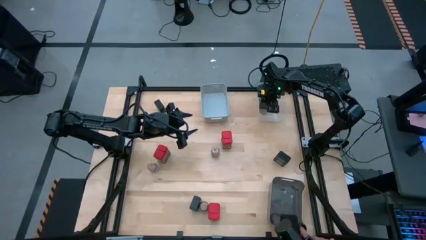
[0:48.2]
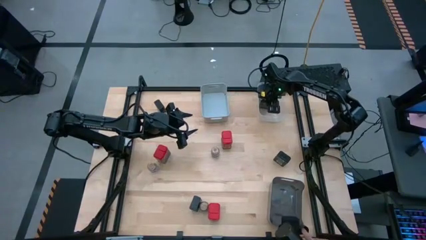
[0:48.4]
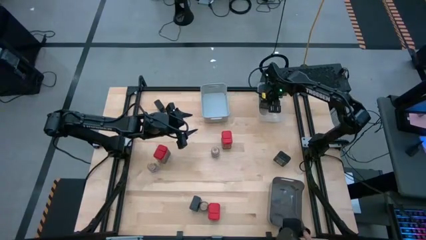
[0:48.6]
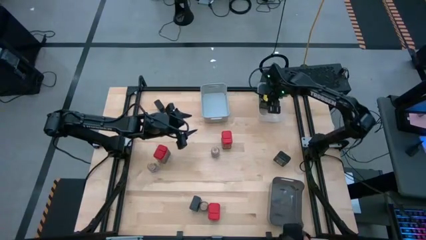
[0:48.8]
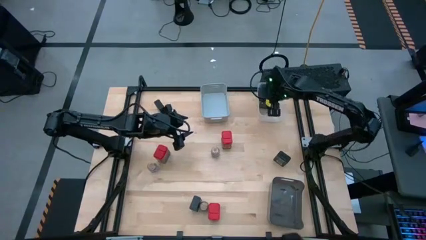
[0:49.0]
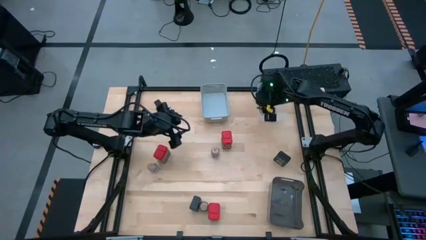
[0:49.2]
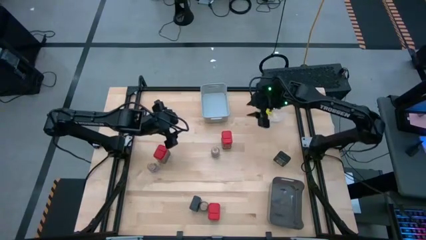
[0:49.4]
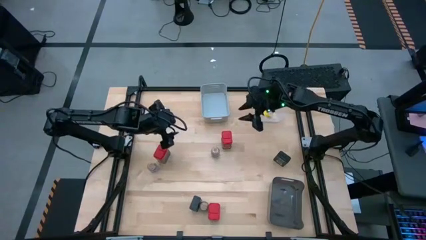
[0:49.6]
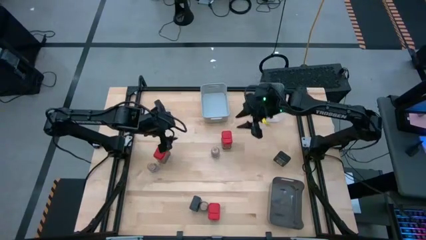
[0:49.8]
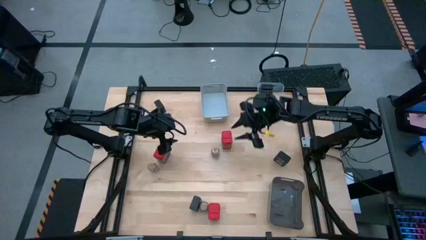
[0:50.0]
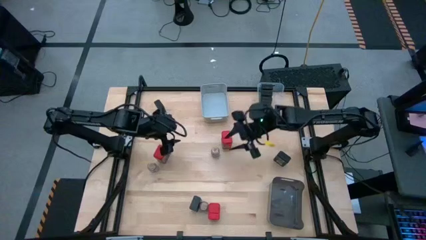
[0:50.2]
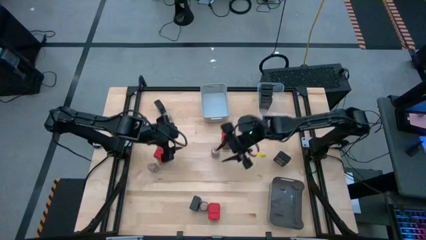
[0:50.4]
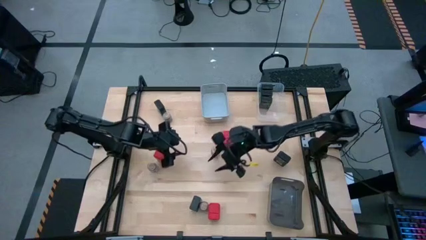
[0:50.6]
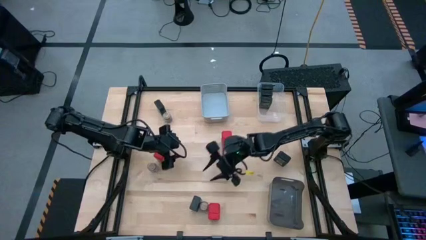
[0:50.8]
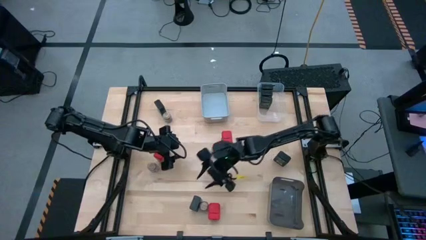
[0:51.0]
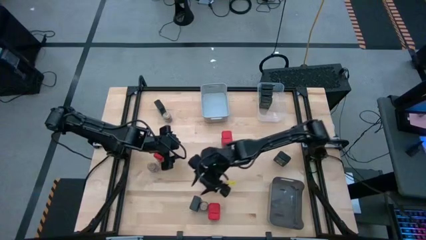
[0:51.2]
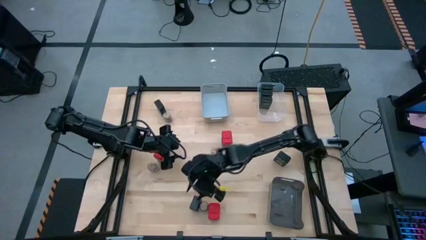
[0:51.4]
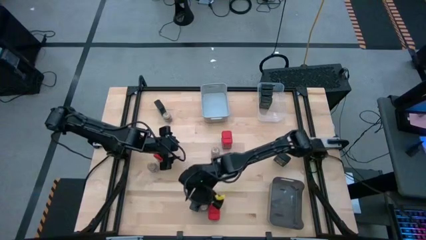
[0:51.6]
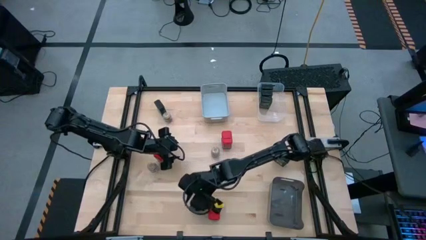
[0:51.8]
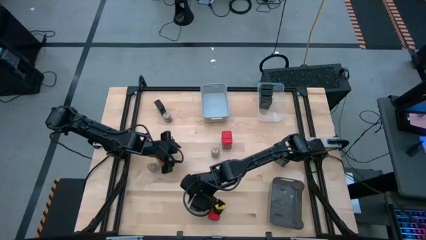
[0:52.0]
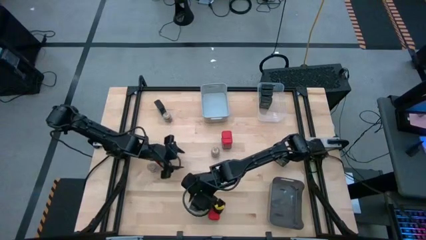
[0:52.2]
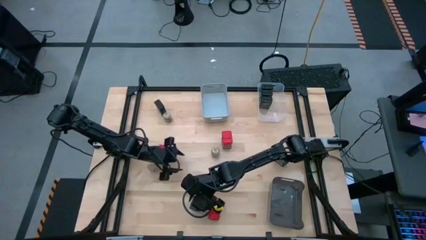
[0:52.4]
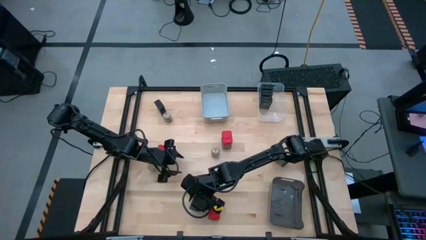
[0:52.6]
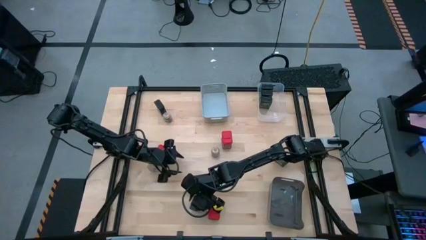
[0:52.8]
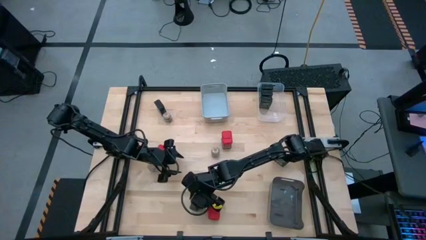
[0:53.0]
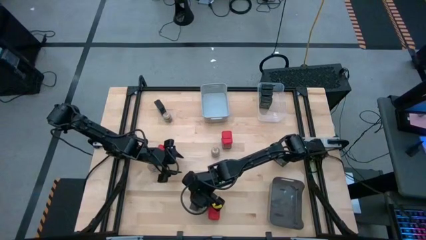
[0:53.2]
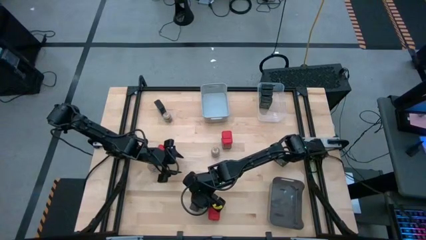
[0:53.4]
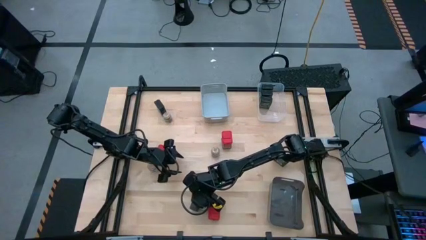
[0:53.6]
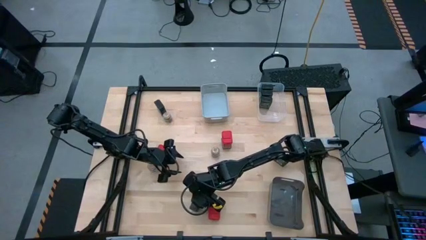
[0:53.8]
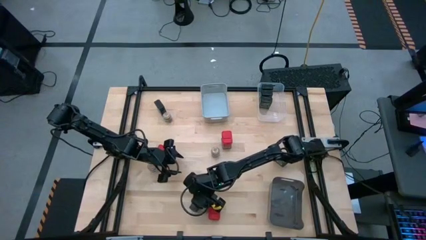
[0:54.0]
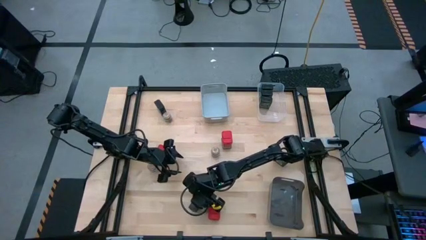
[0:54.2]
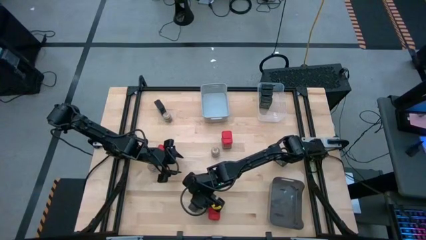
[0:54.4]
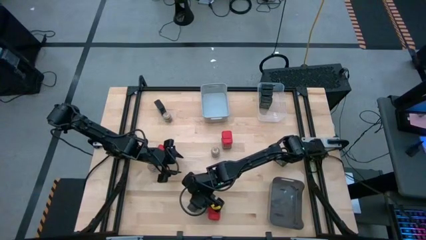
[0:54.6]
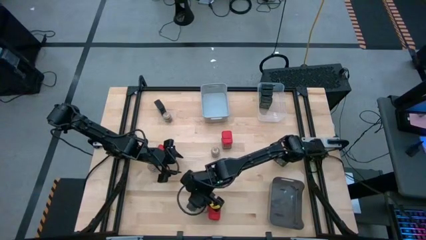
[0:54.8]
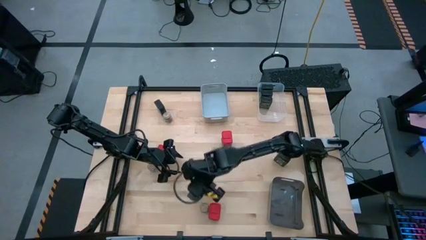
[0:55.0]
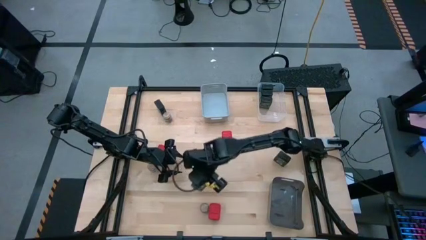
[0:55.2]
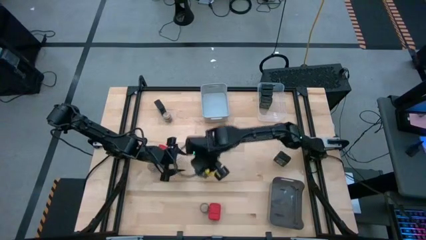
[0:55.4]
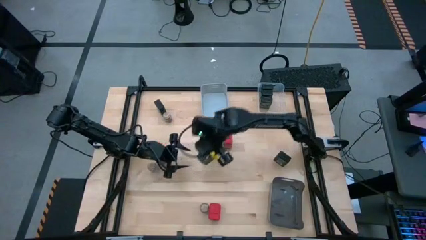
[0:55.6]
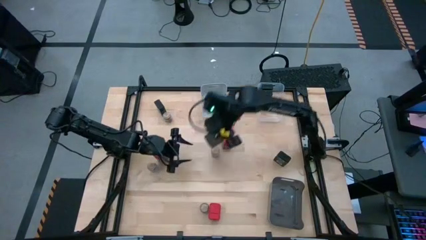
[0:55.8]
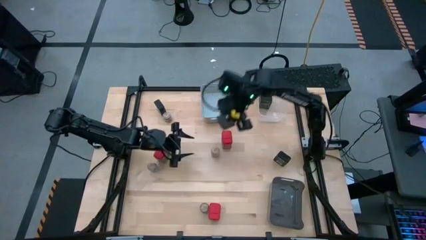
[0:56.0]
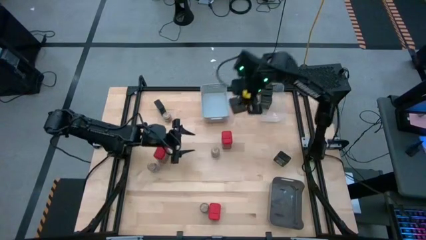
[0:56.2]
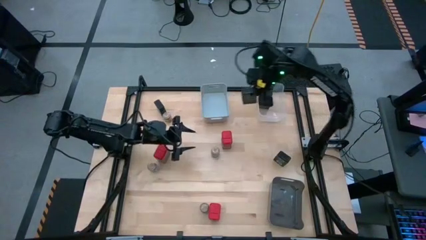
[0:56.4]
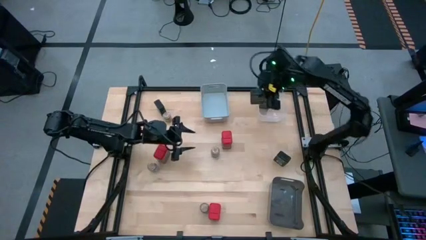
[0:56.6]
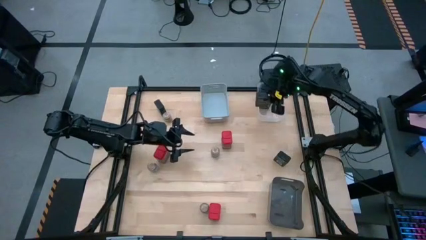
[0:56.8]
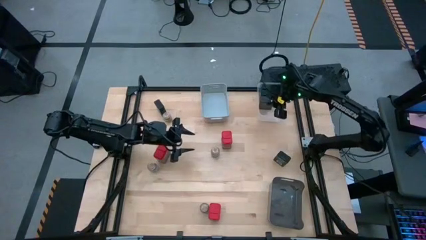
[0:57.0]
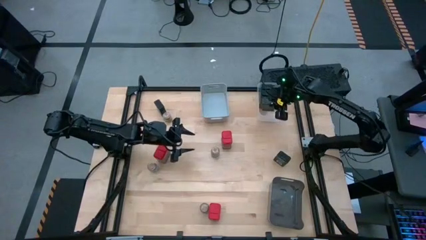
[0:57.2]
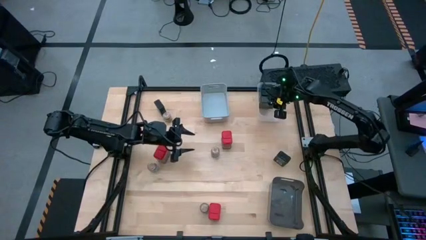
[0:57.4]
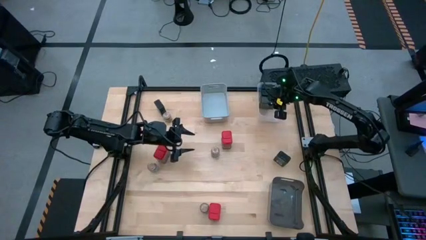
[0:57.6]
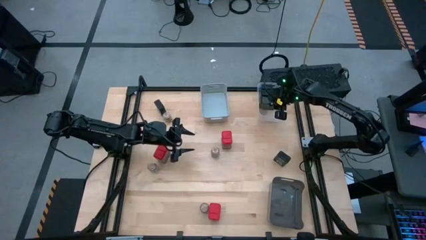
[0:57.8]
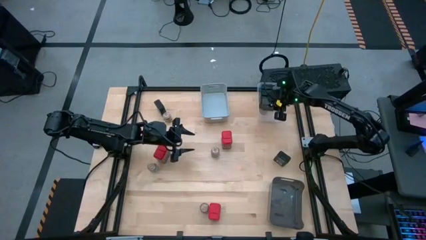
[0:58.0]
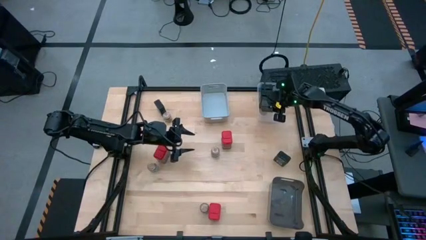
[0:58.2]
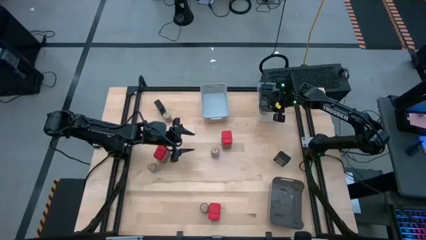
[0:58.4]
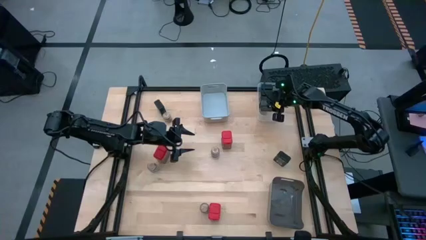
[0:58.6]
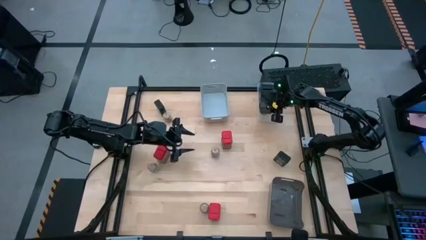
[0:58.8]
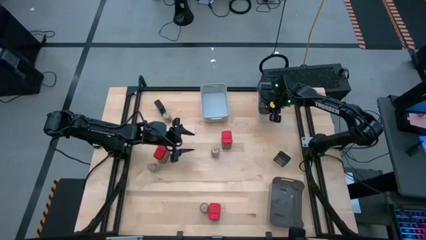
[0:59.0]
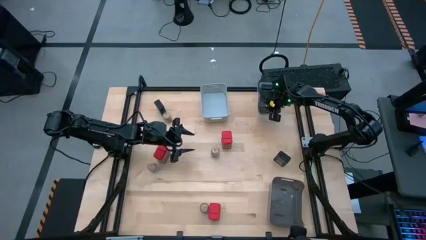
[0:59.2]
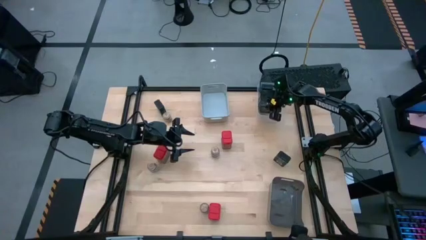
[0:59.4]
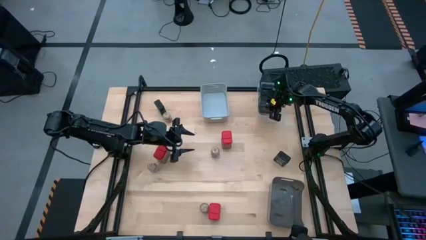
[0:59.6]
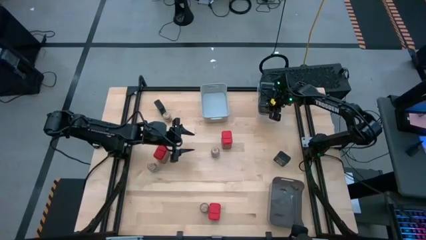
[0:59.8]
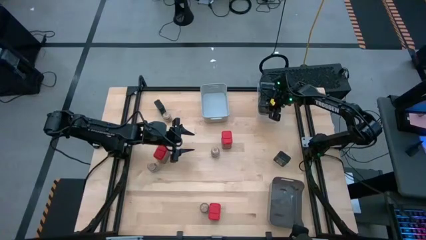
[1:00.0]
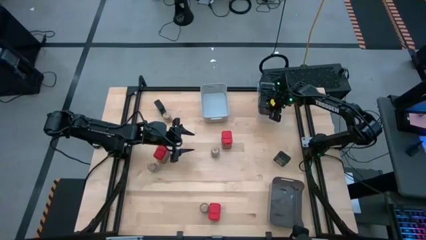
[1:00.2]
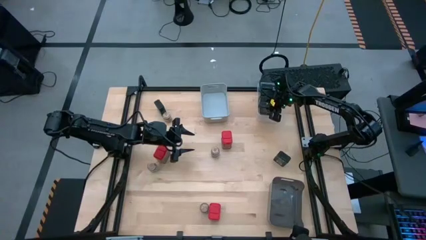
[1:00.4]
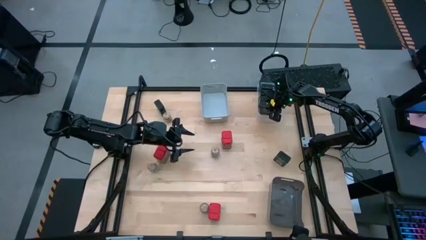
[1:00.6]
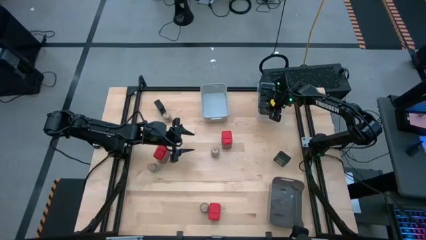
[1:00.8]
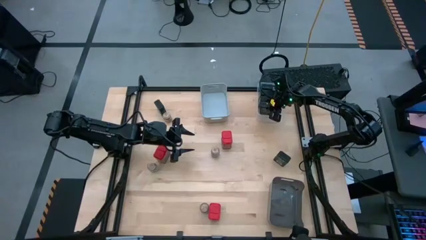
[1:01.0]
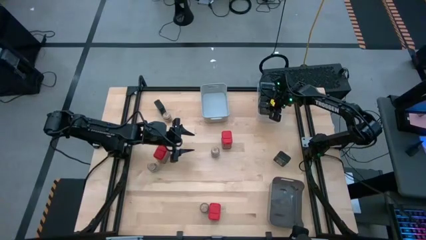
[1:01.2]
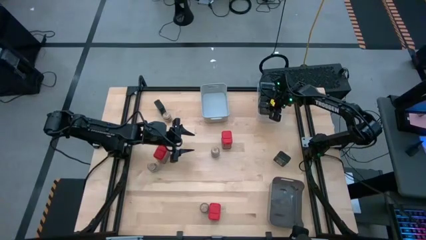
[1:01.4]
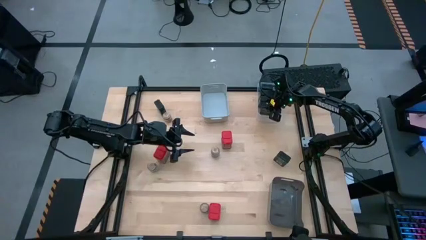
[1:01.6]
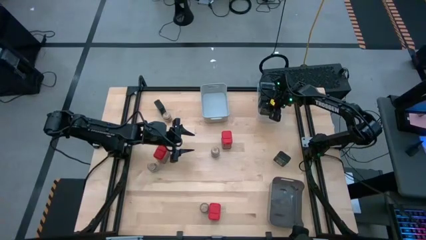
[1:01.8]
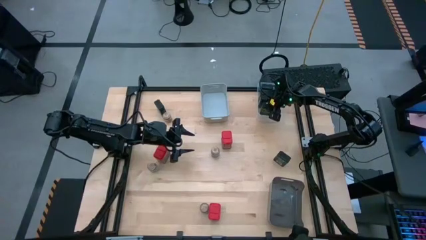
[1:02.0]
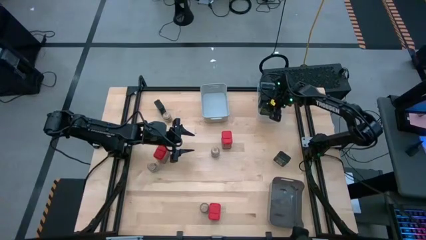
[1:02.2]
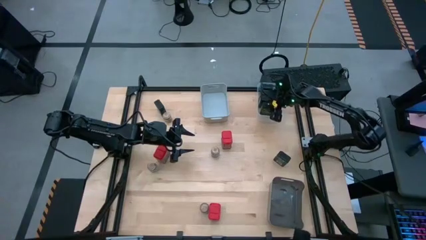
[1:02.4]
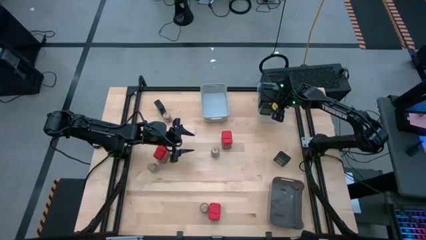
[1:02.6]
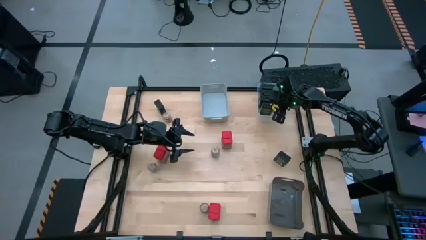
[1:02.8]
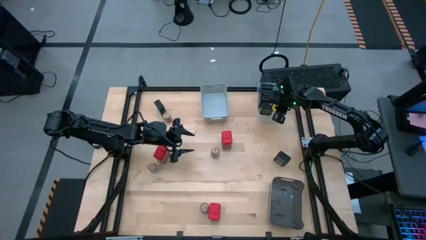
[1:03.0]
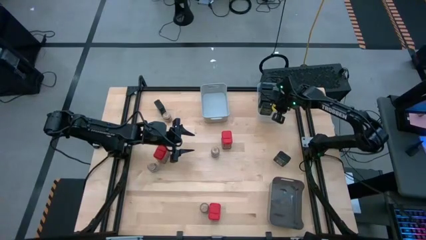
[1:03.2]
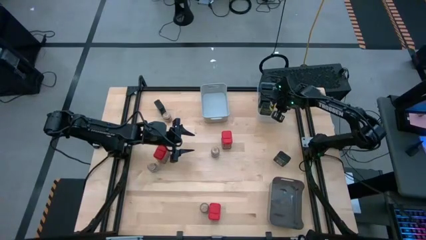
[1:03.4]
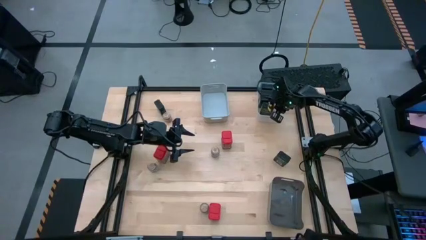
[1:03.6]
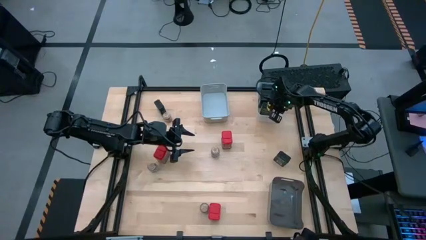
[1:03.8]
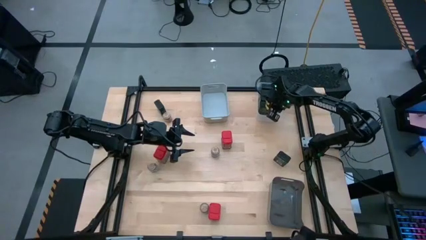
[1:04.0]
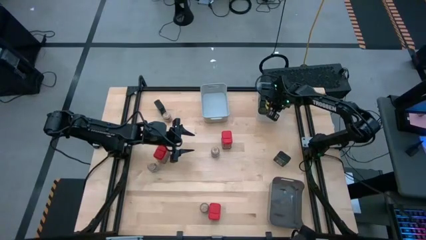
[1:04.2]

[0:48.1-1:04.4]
Task: Sort spices by type
Put the black seasoning can into the transparent bin
